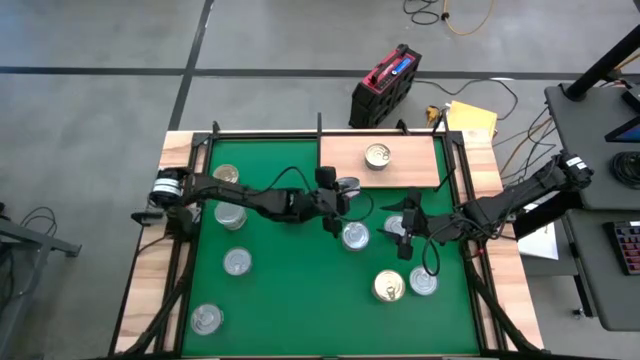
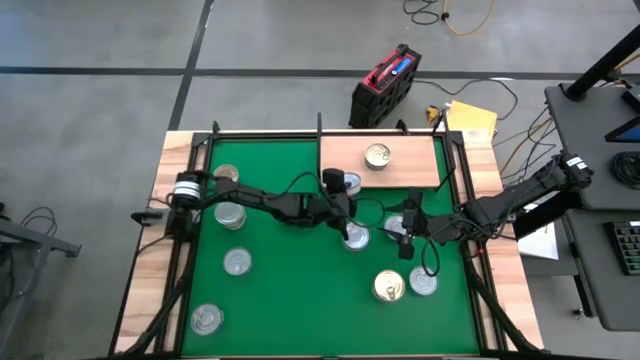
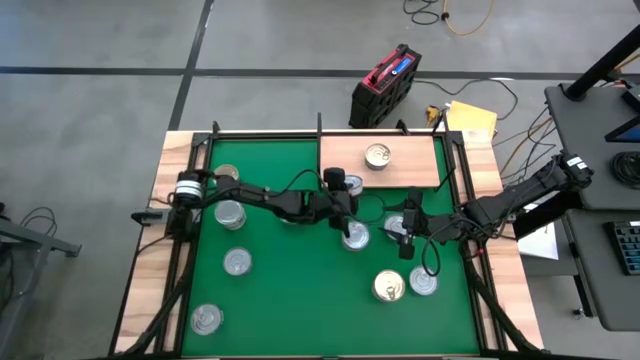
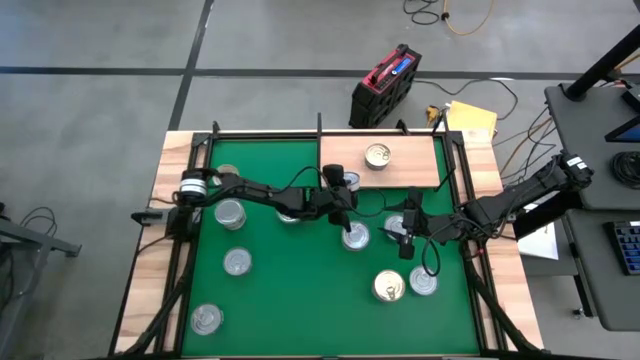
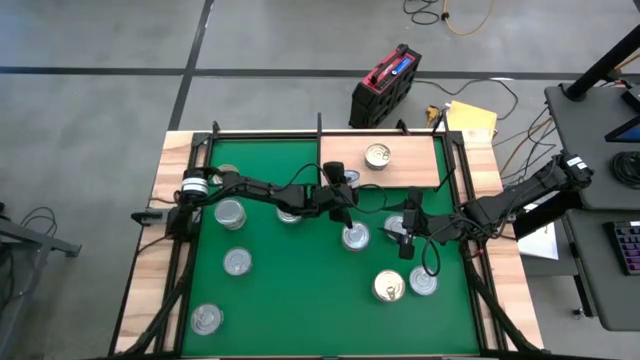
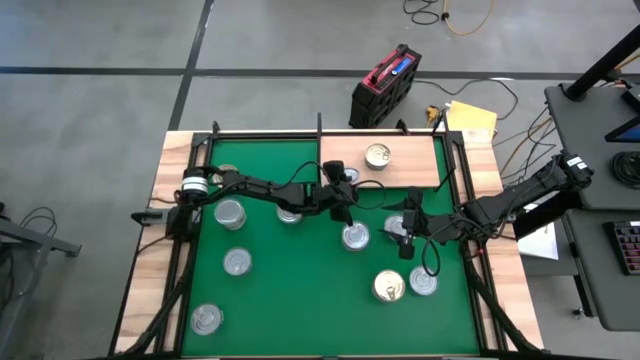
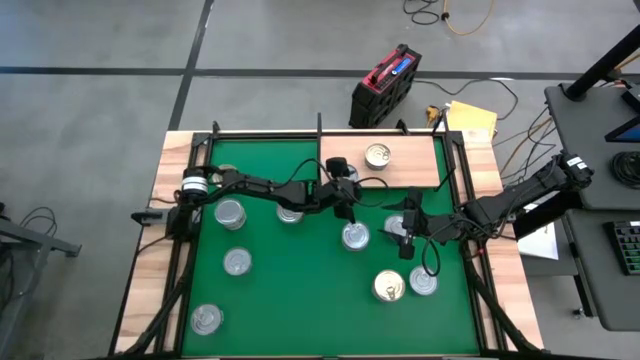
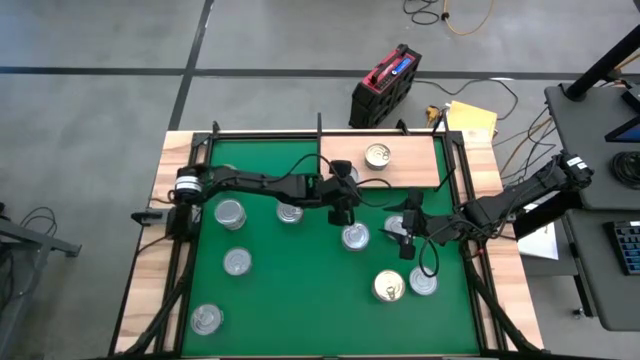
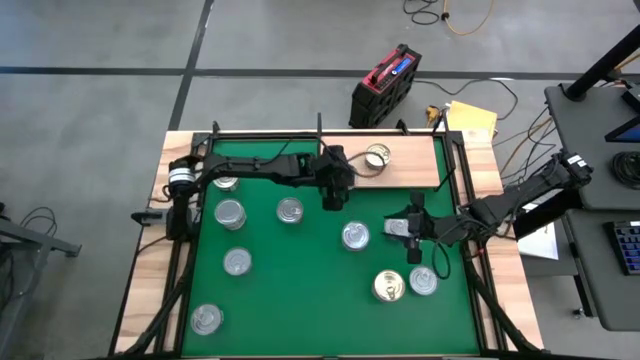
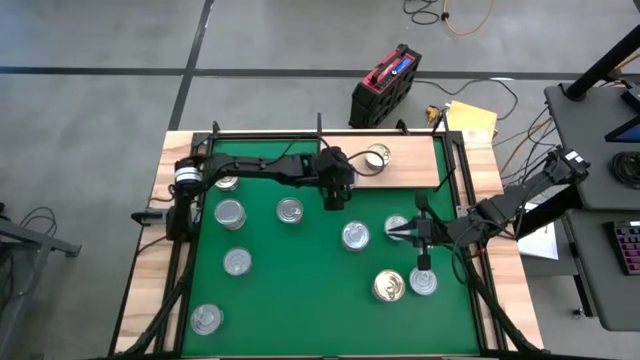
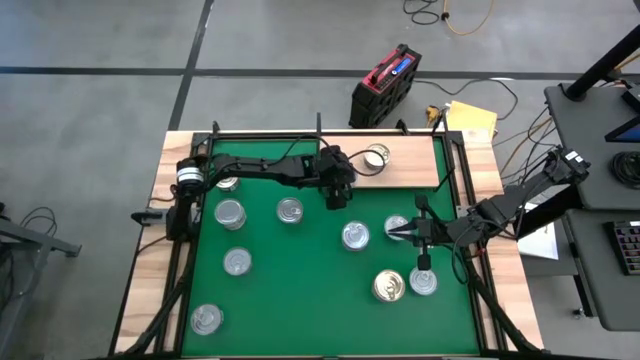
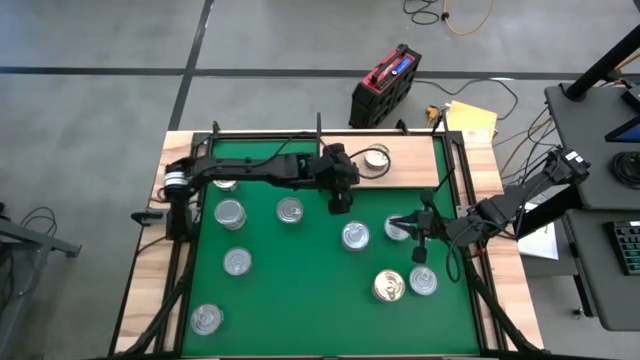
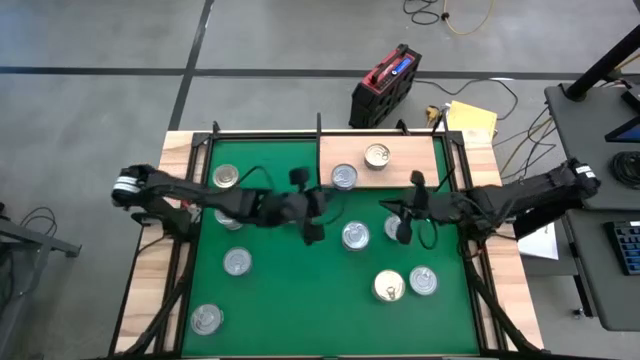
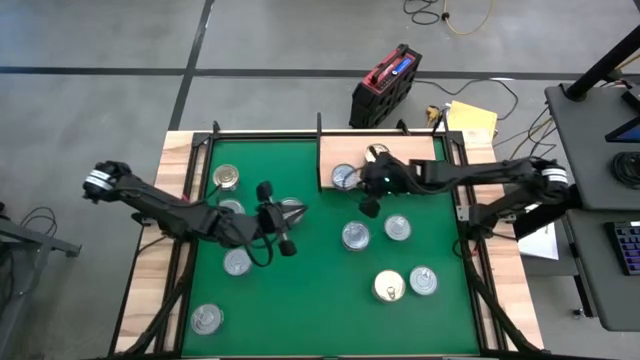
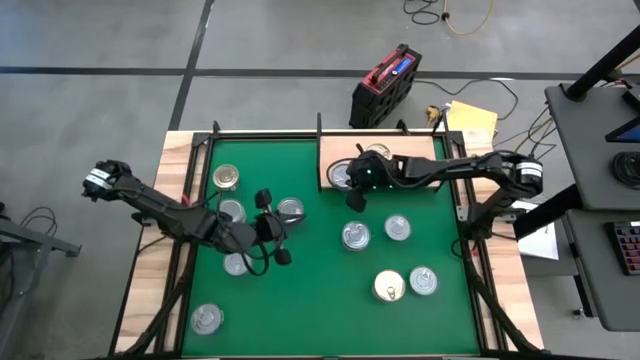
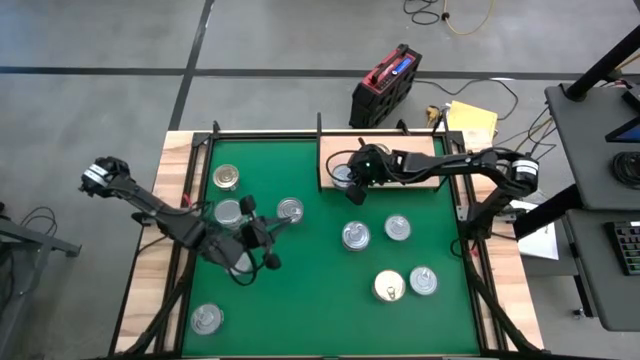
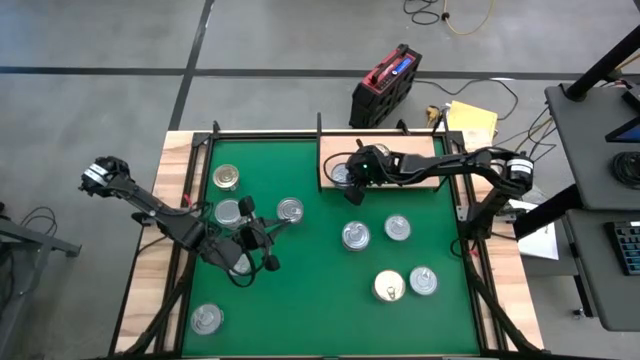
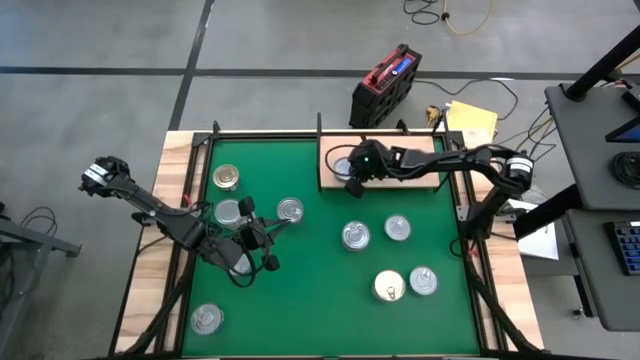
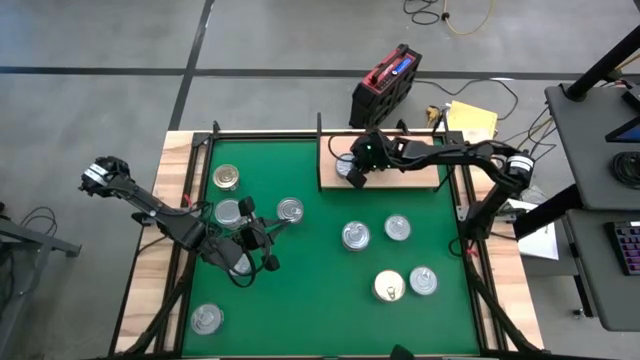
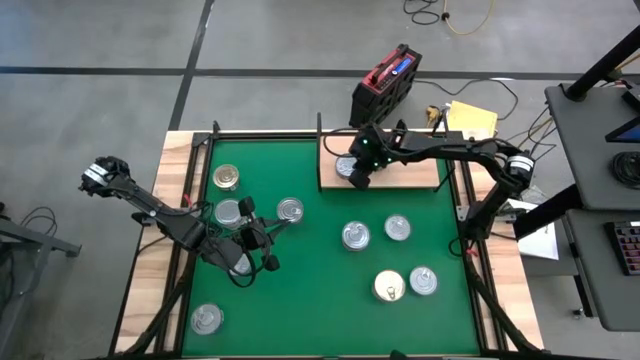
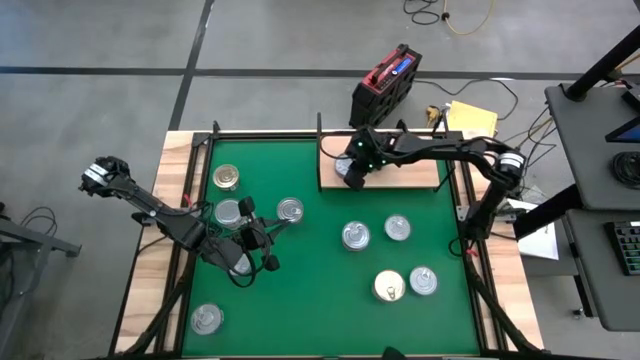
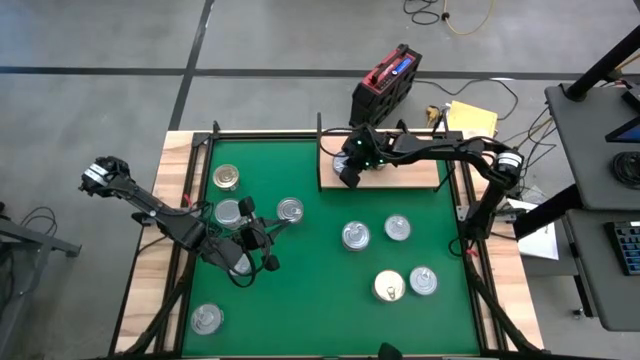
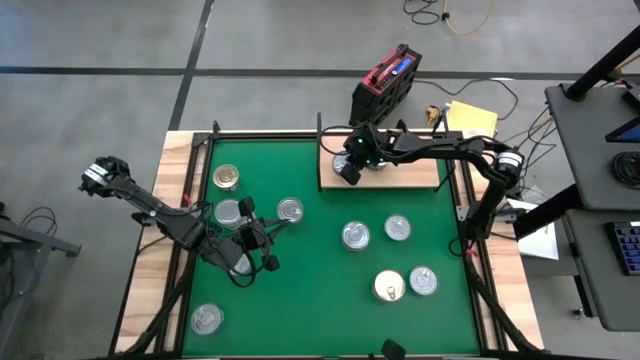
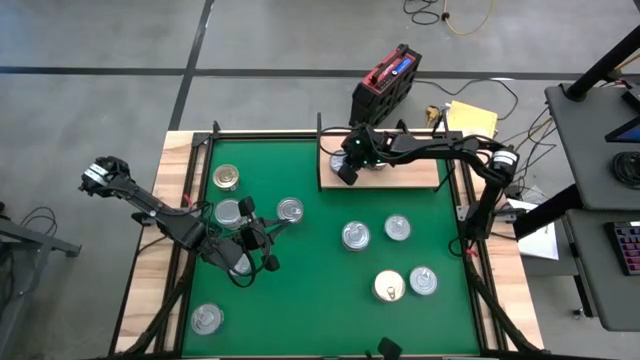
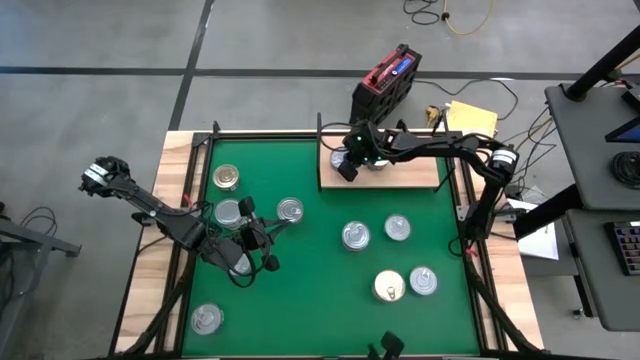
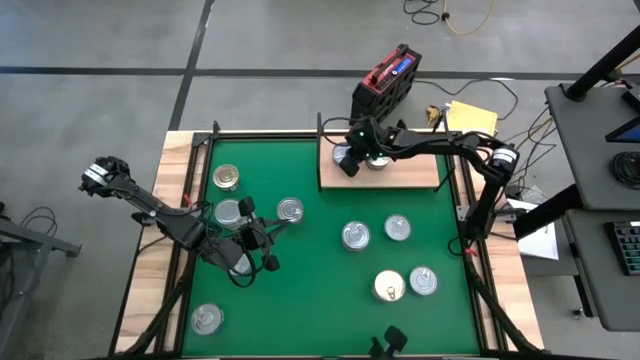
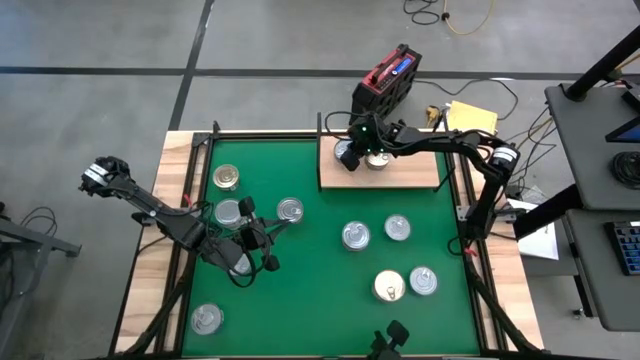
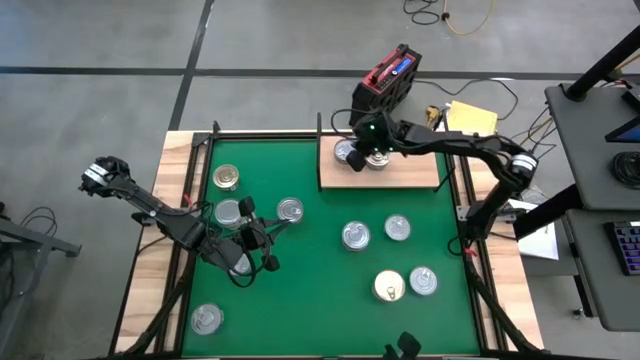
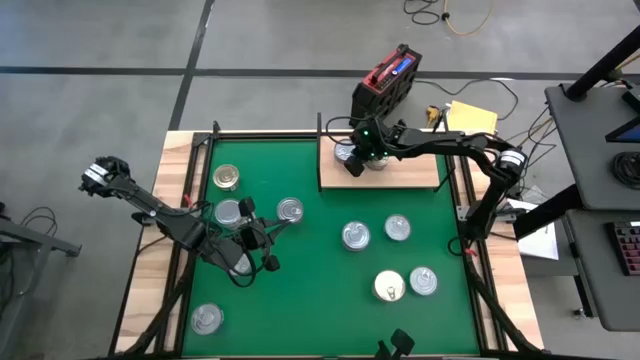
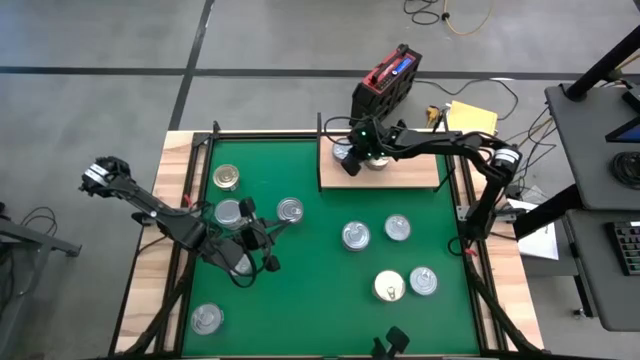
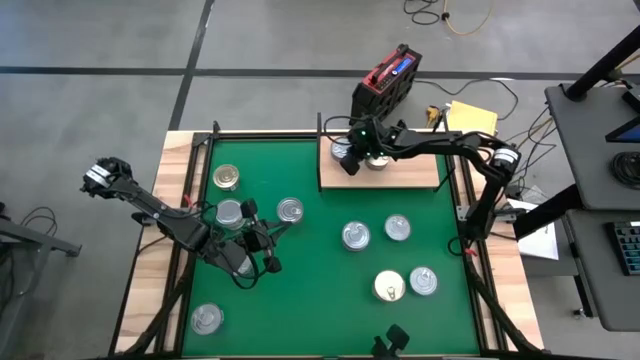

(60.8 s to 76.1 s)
Task: Stack canned seafood by type on shelf
Put the red tuna can on the shelf

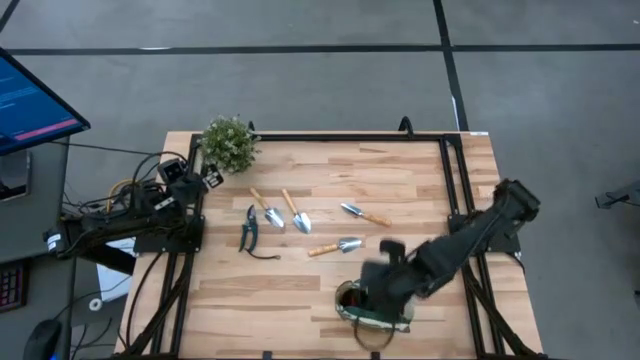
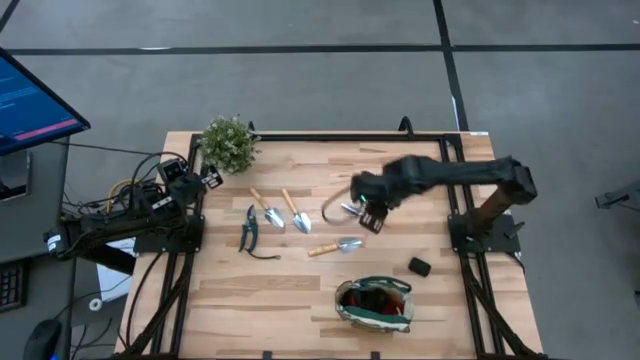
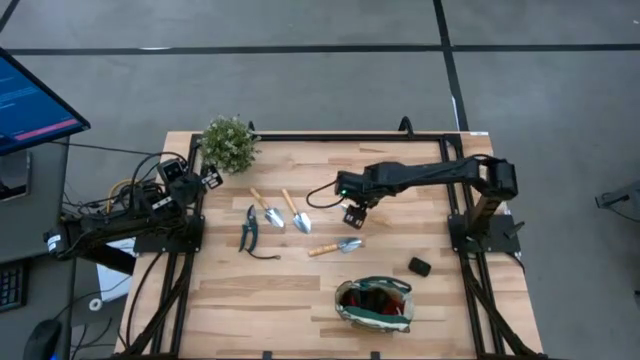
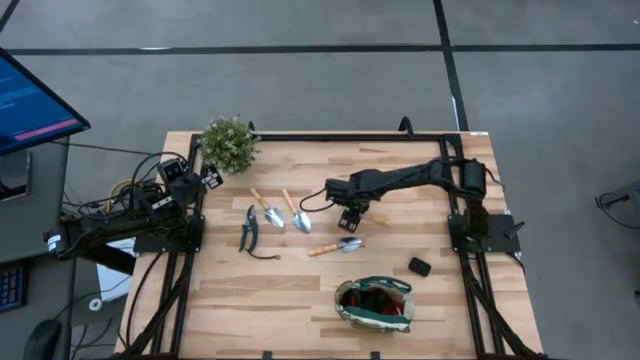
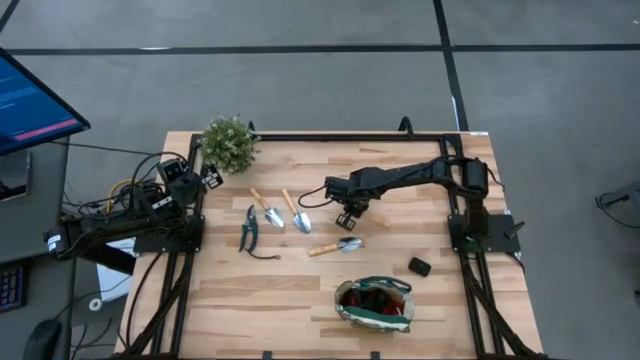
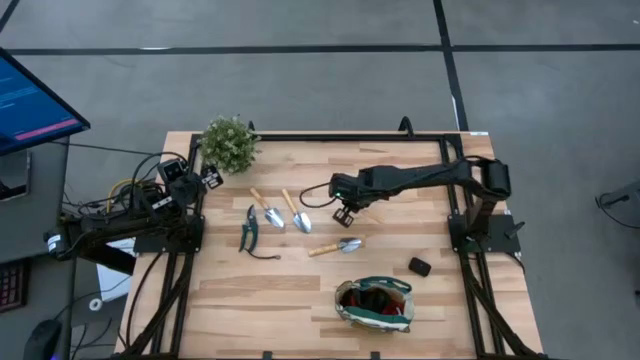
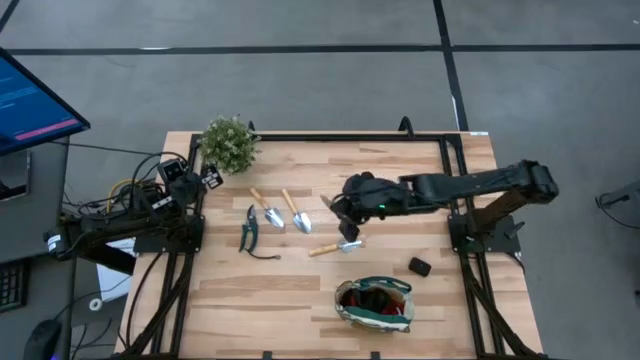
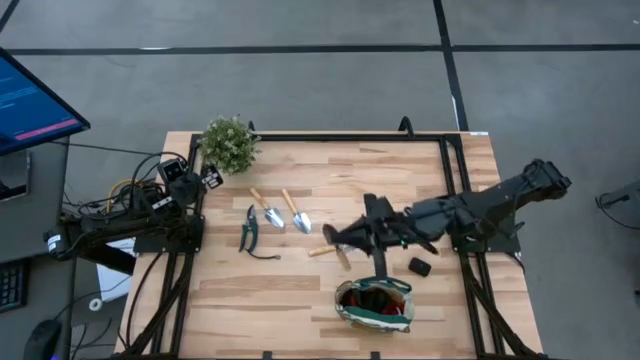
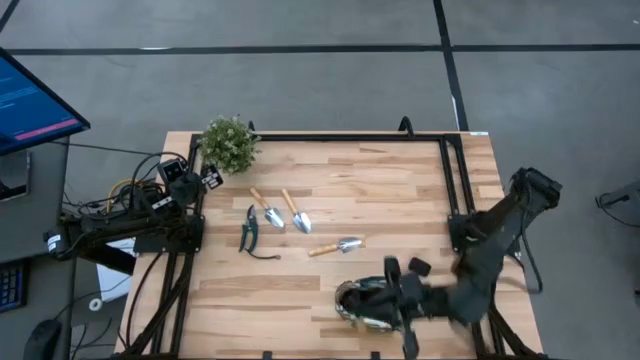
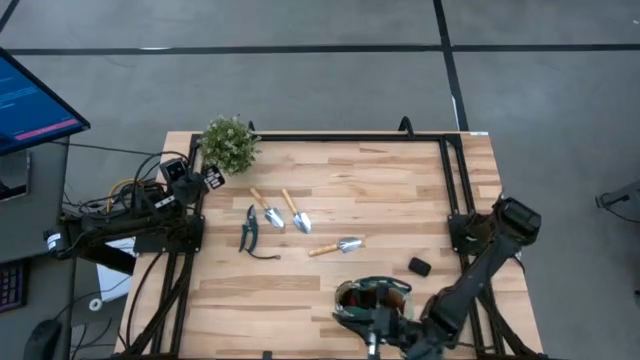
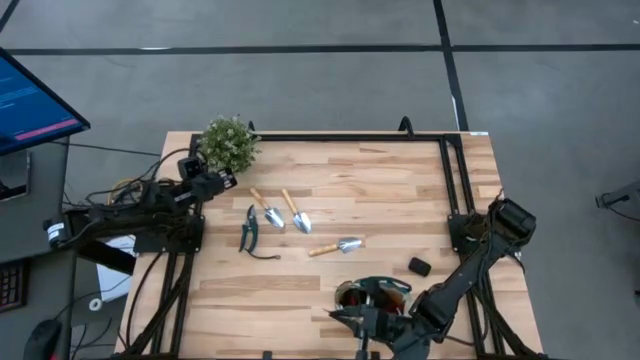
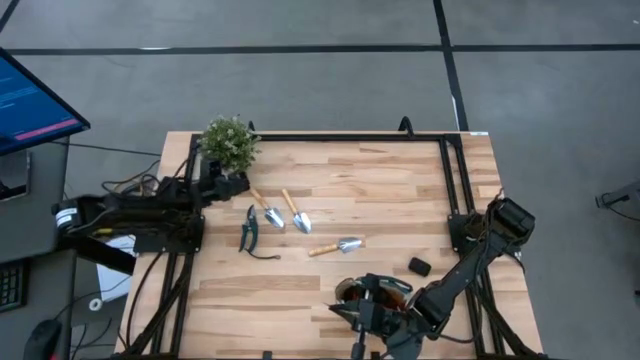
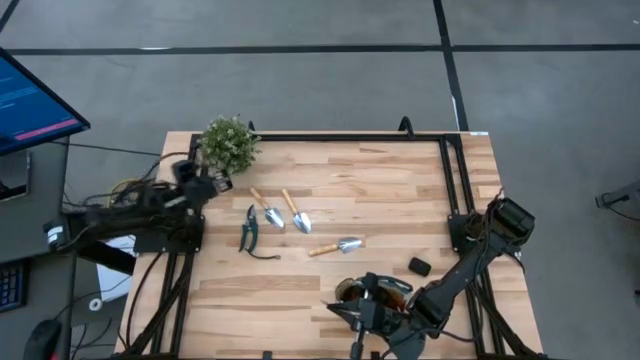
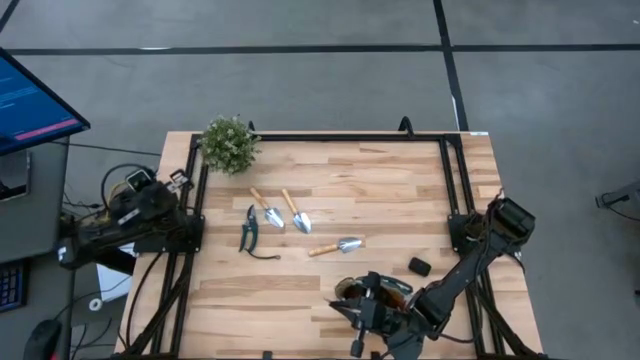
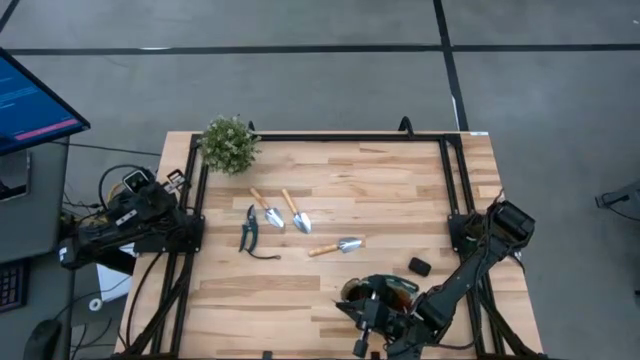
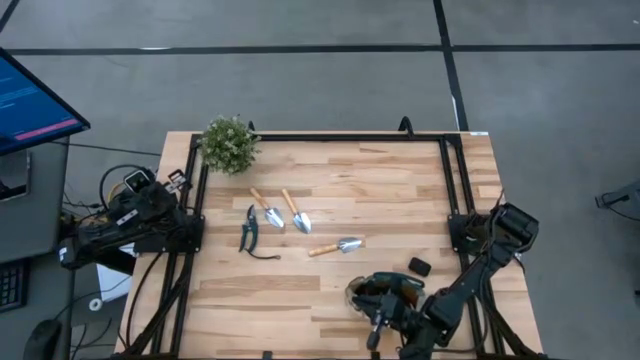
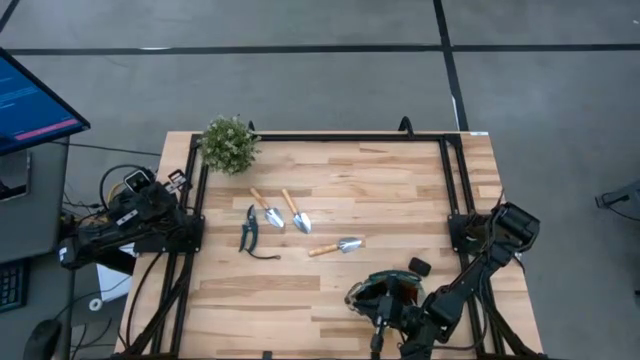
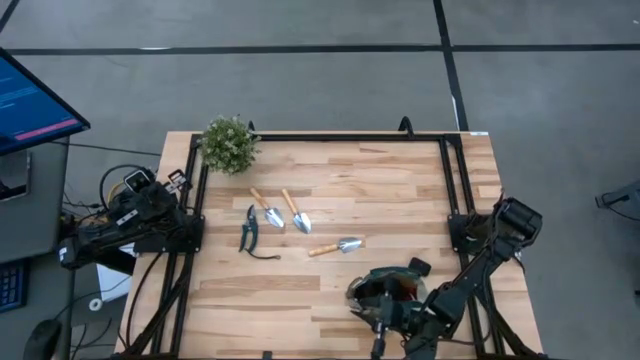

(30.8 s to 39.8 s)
Task: Pick & Place Garden tools in Gardening bag
Put the brown trowel into the gardening bag
